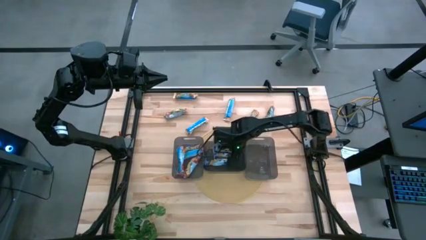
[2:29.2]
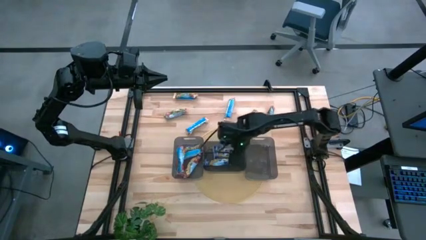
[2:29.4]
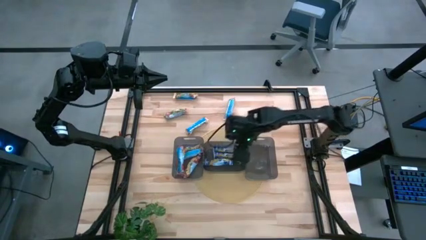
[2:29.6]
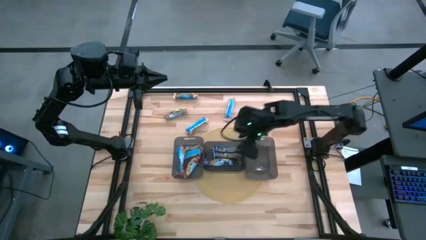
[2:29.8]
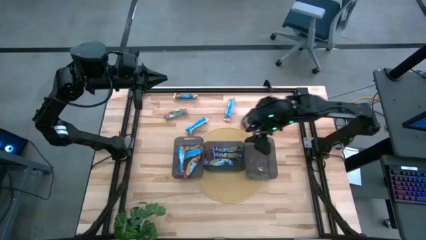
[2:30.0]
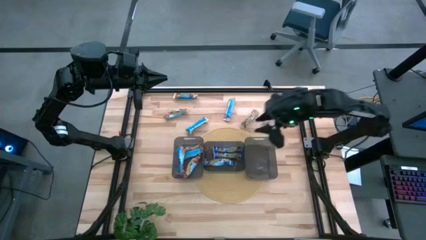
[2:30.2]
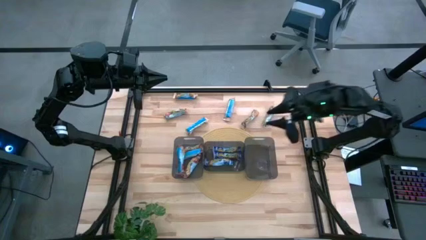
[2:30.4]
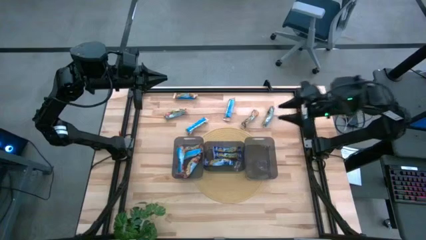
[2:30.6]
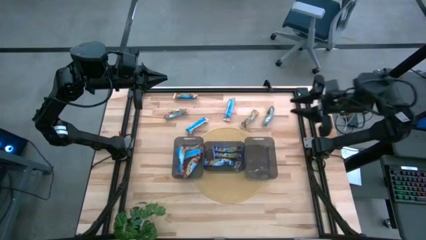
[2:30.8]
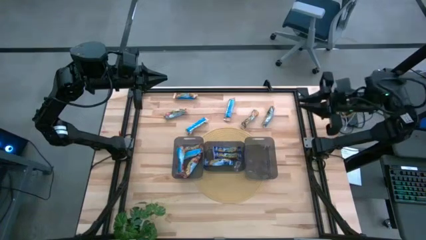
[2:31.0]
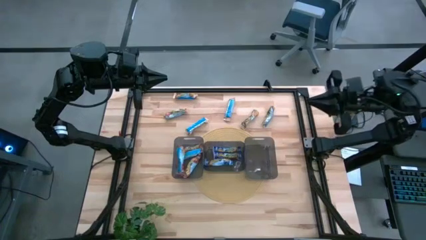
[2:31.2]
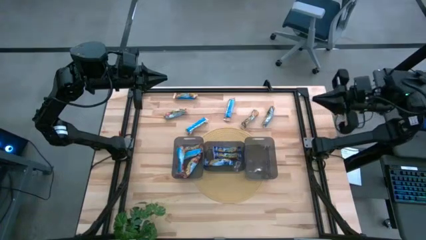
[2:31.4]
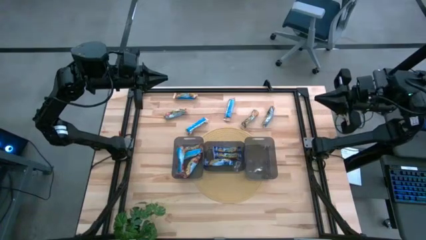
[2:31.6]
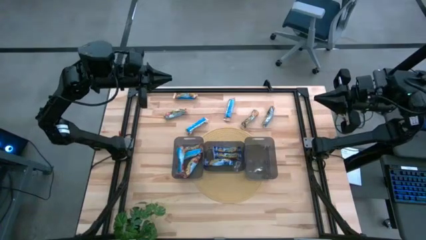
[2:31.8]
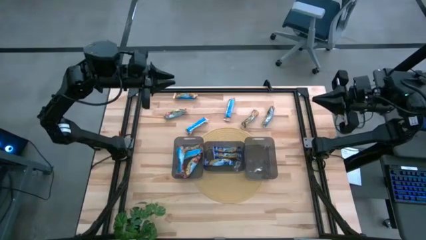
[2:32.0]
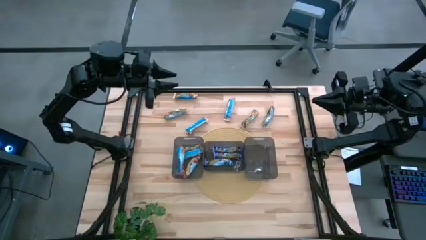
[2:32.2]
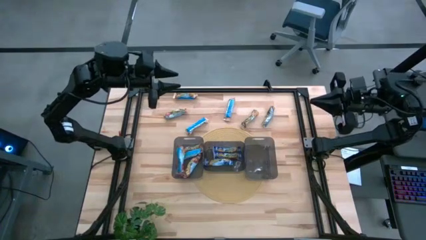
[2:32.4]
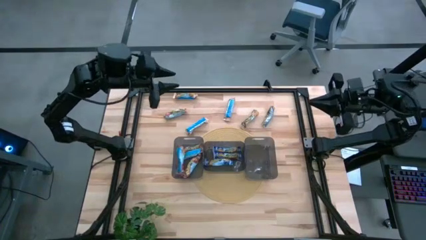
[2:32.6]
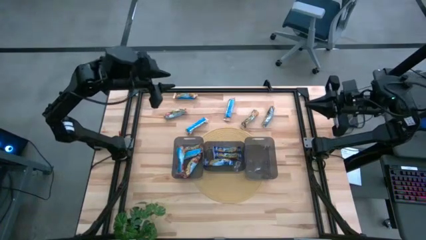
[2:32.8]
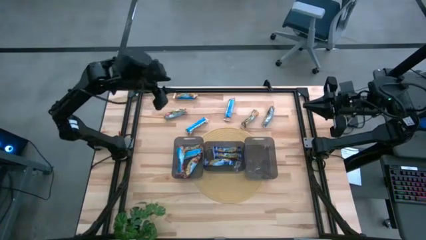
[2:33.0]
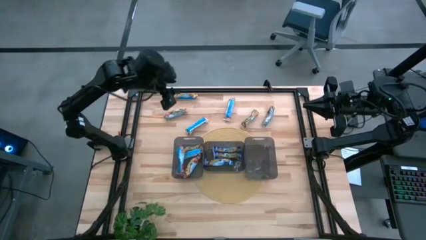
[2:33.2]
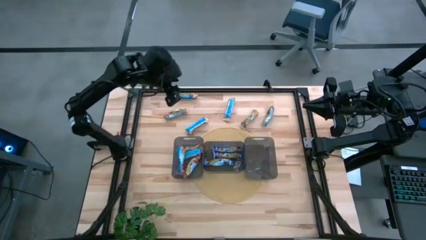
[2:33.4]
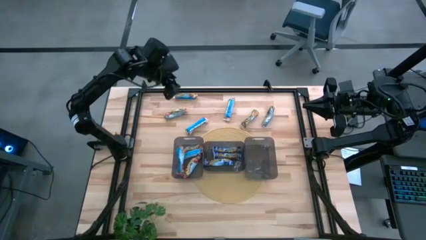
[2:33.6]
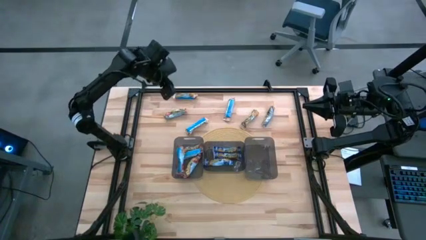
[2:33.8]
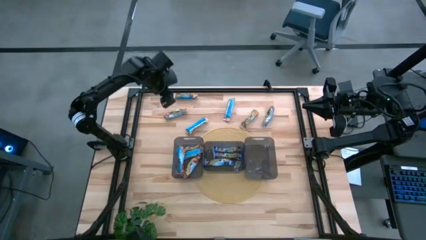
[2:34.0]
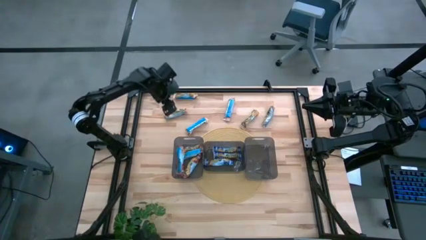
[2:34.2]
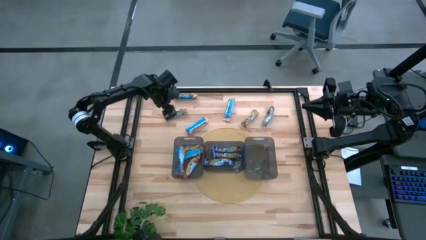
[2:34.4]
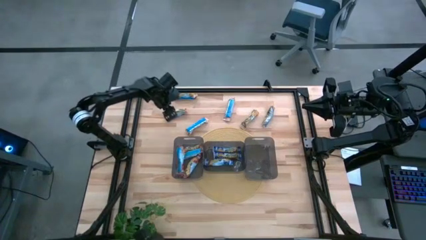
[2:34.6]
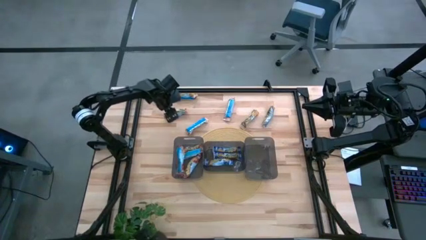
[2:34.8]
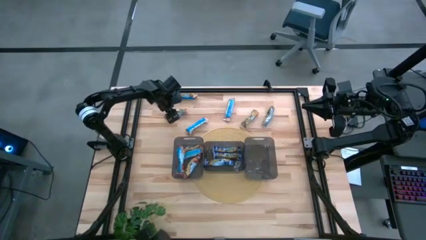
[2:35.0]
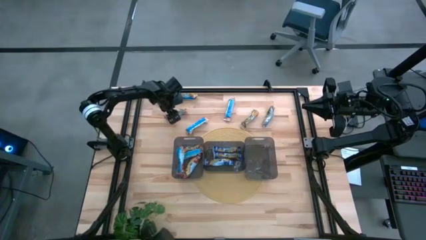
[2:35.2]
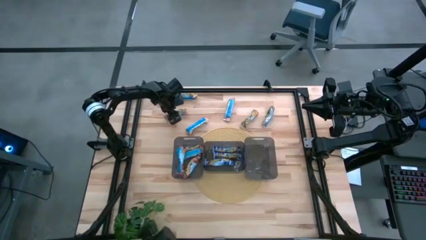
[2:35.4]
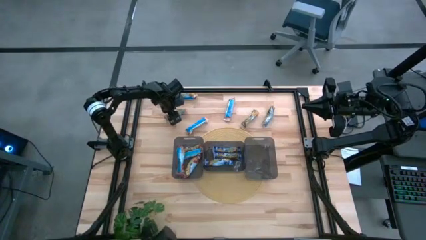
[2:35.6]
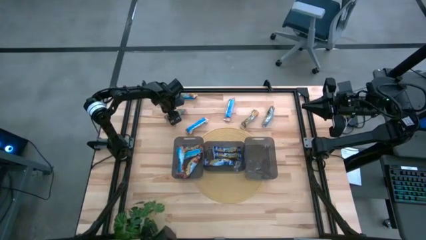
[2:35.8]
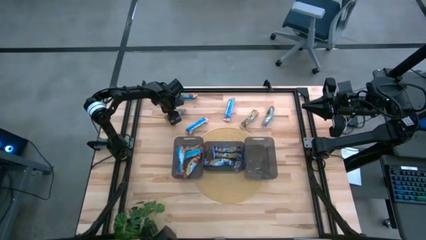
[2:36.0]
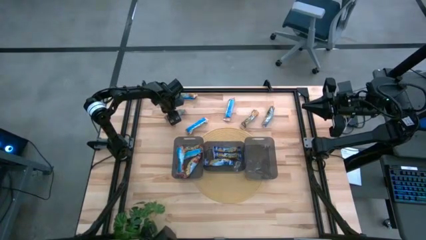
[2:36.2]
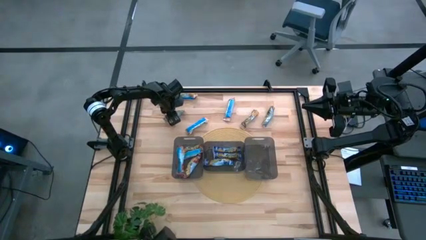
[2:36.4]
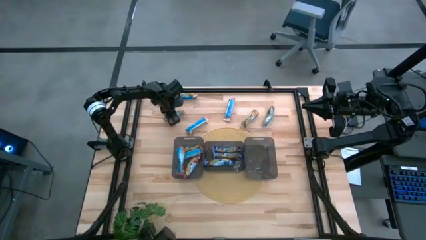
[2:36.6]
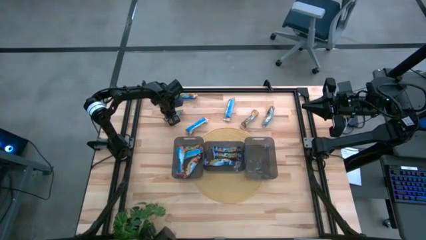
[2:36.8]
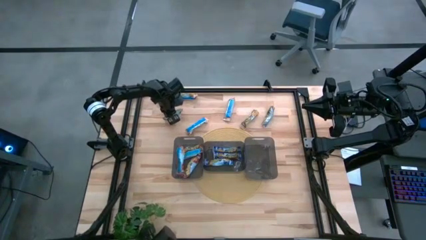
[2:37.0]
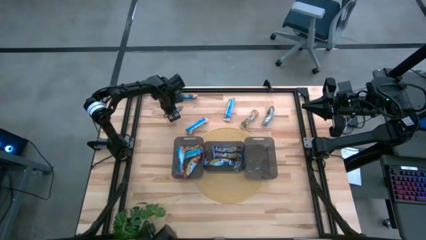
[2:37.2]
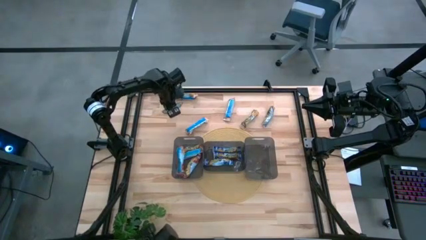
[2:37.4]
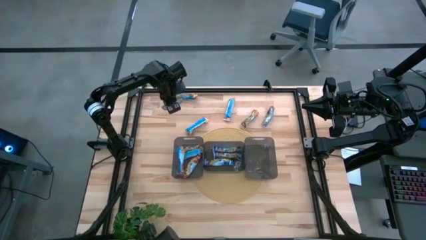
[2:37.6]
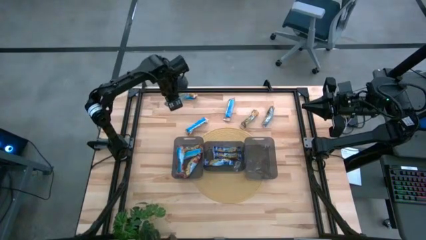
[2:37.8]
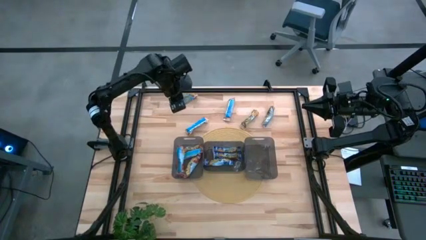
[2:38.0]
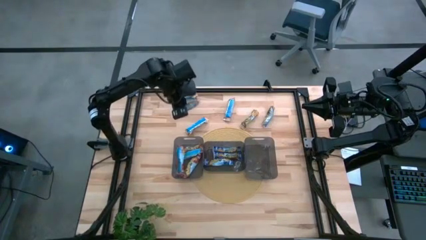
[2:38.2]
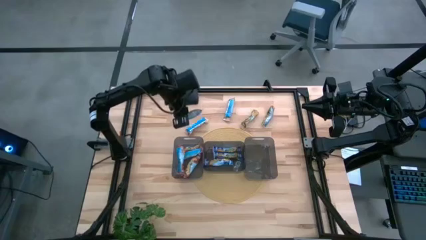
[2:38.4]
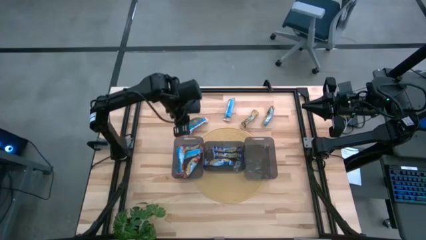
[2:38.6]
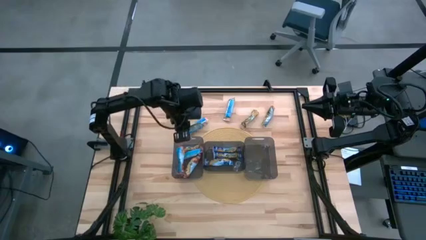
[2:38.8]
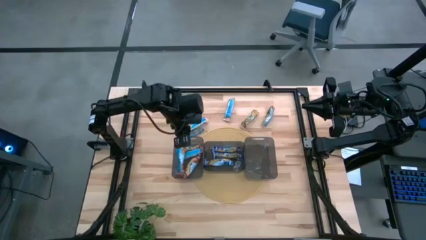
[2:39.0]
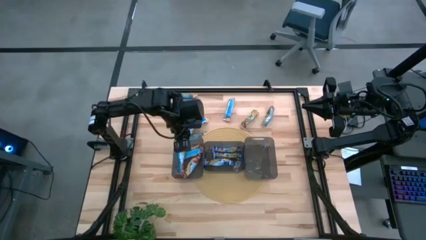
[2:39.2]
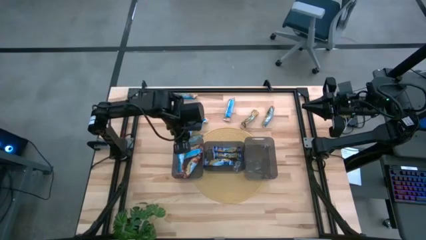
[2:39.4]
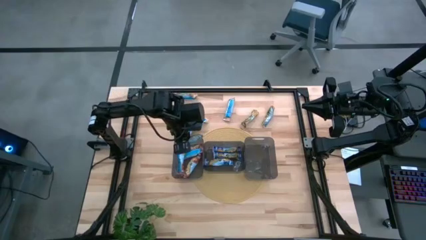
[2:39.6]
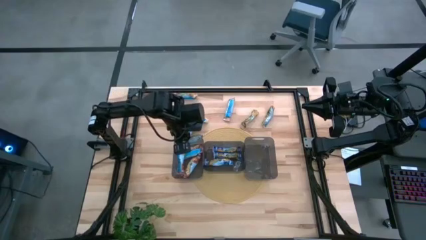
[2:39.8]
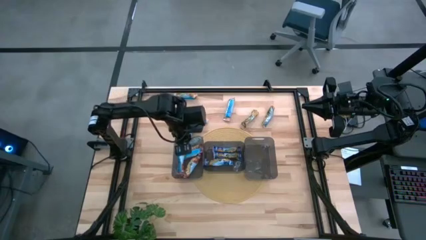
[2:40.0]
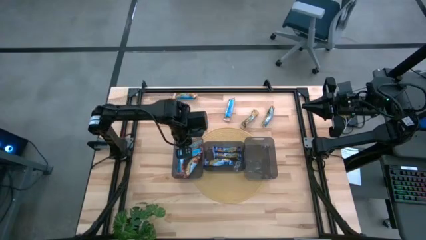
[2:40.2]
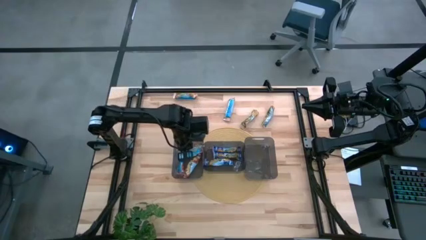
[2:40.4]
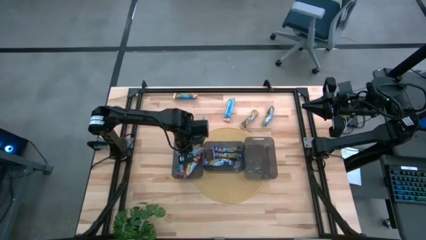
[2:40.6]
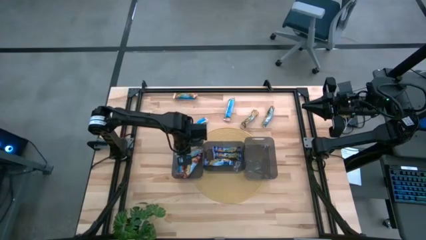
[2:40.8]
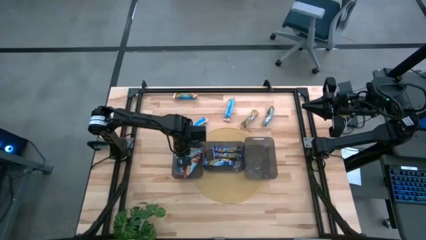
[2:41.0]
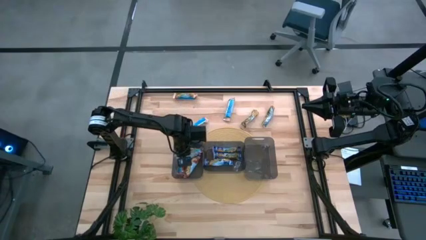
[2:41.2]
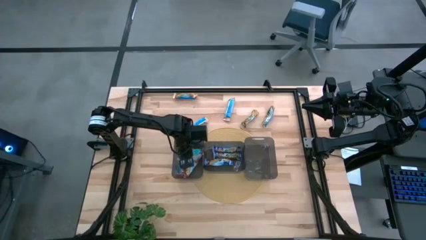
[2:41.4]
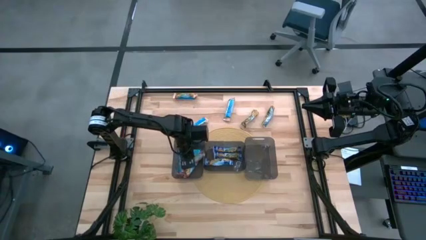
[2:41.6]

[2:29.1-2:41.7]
Task: Pick and place Granola Bars by type
Put the red granola bar into the left black bin

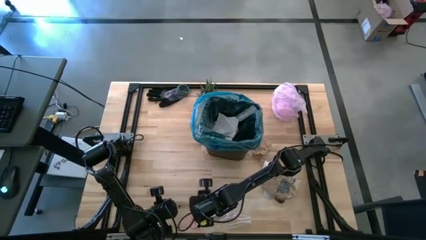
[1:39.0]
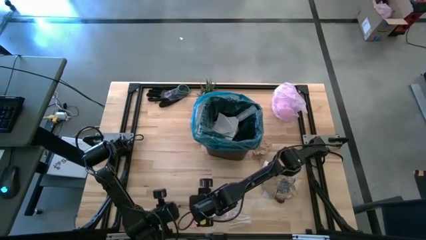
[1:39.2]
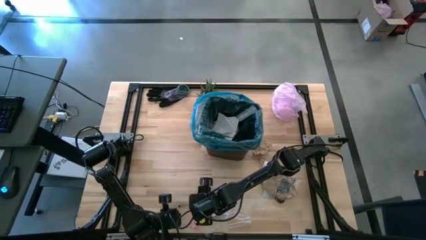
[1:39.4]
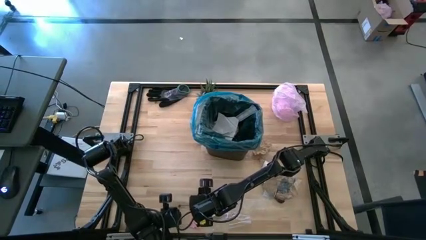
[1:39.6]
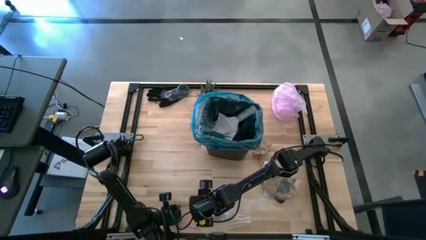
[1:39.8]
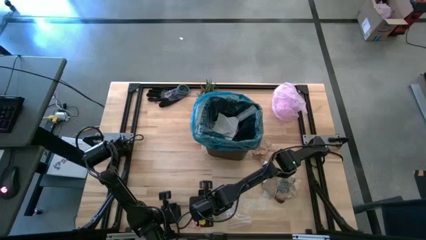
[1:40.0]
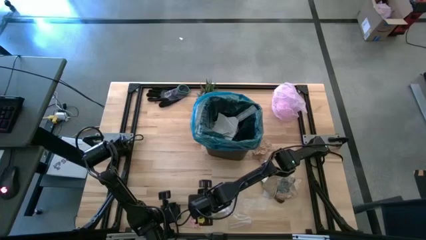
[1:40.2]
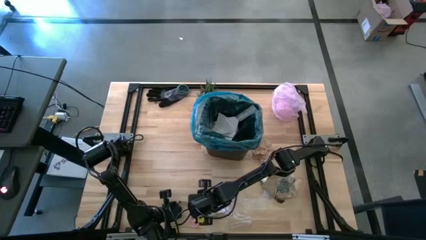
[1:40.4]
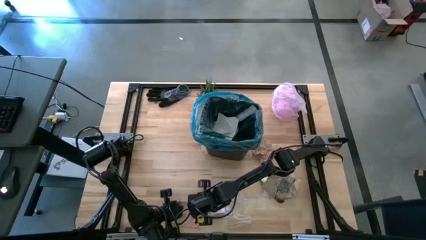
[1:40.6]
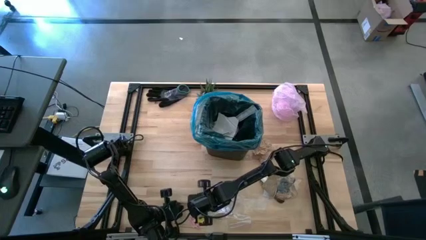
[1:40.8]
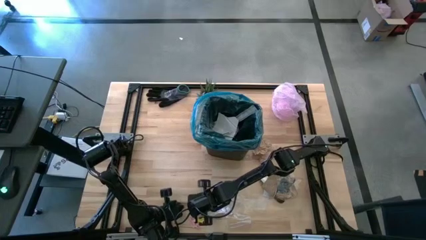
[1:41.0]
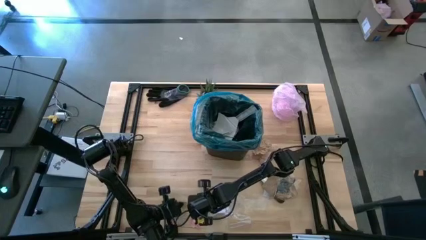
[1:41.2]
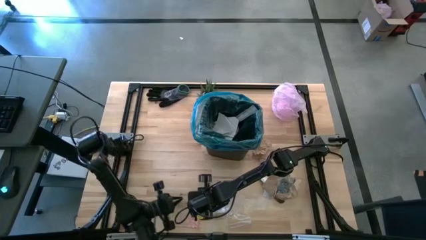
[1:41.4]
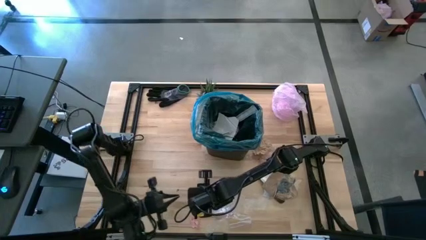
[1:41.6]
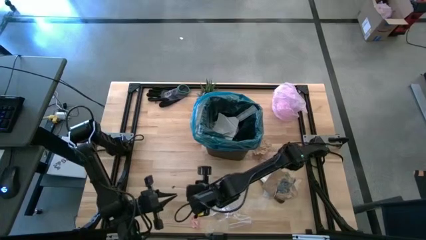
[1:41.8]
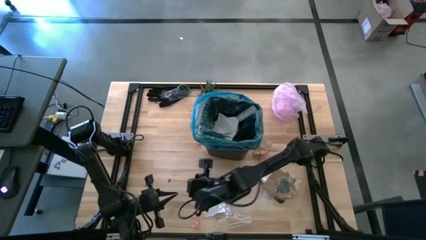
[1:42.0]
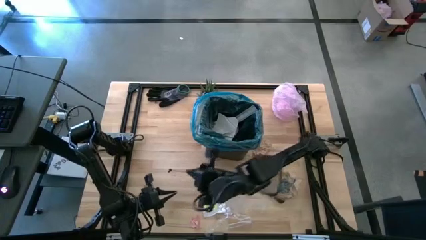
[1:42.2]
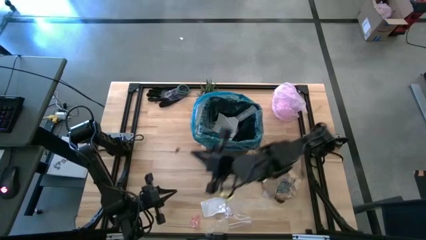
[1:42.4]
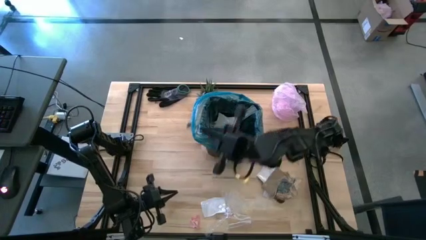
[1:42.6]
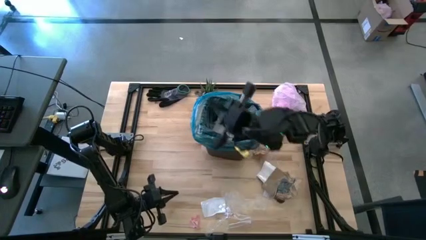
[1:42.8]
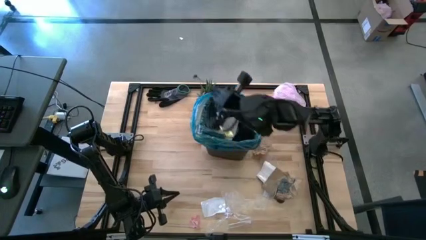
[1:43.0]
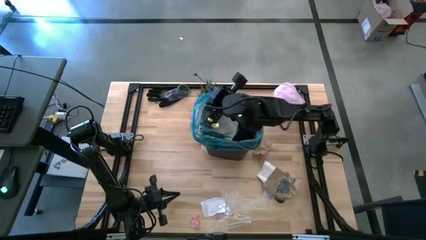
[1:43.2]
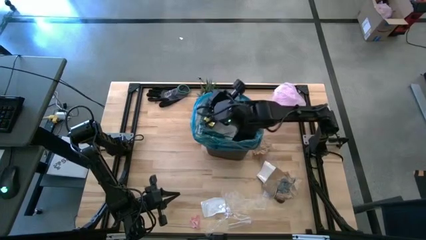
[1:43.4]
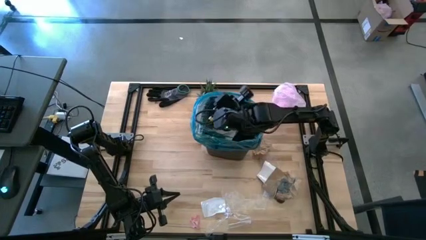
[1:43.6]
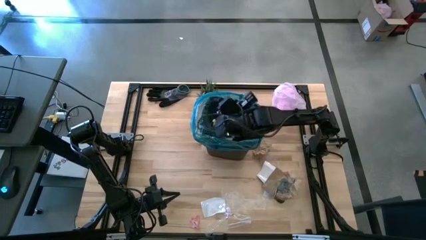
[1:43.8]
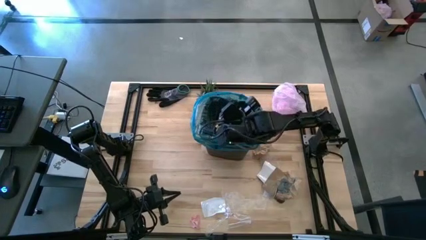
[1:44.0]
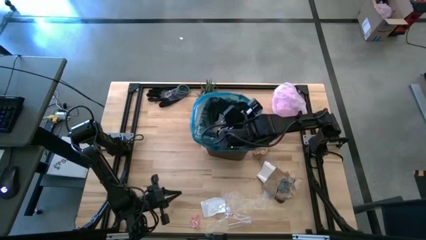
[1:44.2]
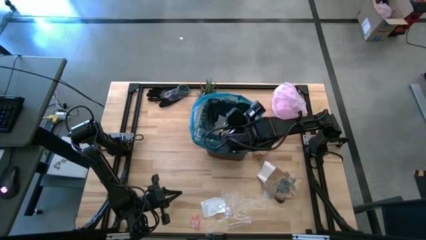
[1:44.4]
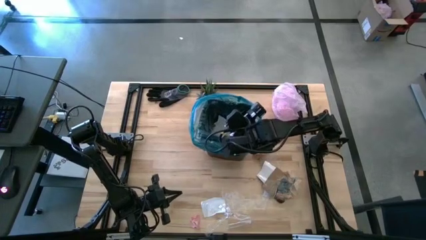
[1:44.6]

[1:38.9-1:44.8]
Task: place trash/remove bag and relplace
Put the black zip tie into the trash bin
